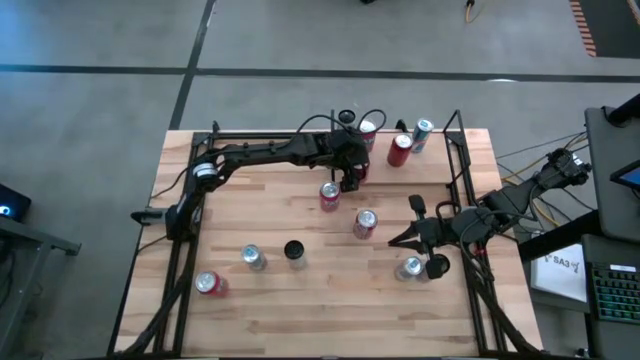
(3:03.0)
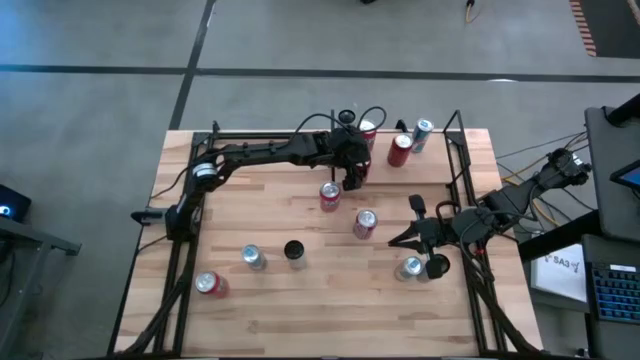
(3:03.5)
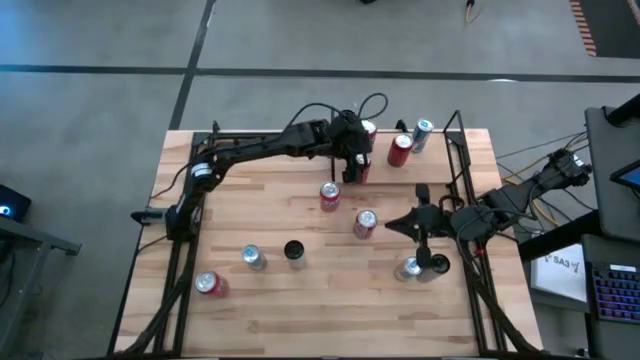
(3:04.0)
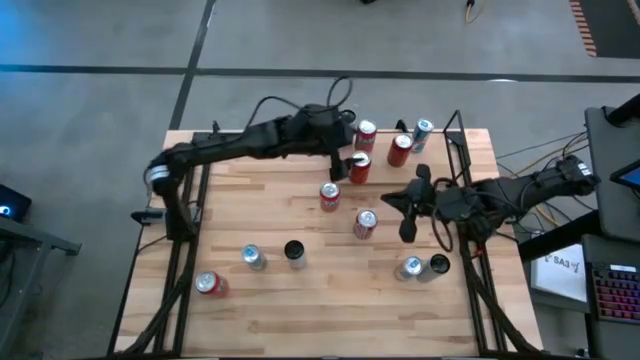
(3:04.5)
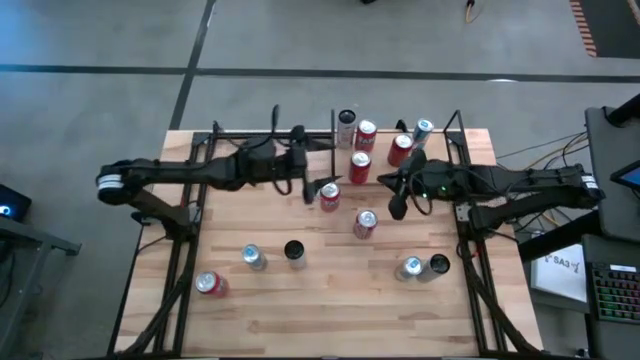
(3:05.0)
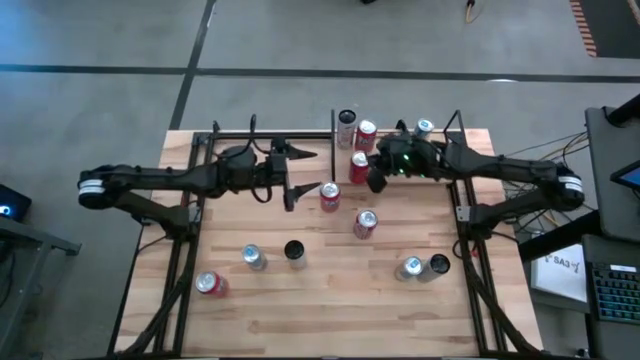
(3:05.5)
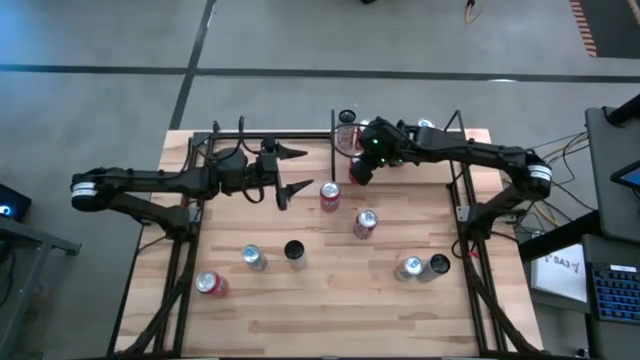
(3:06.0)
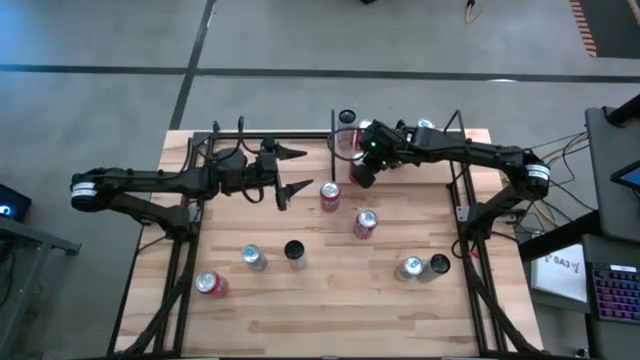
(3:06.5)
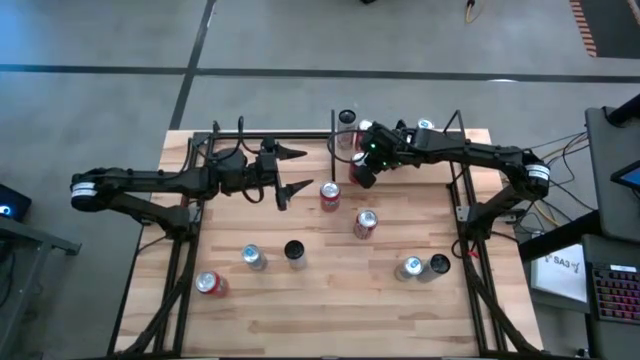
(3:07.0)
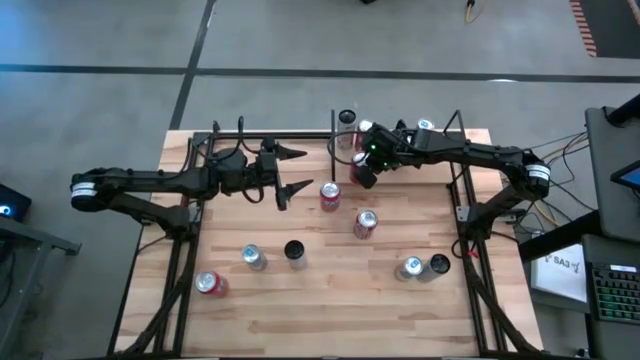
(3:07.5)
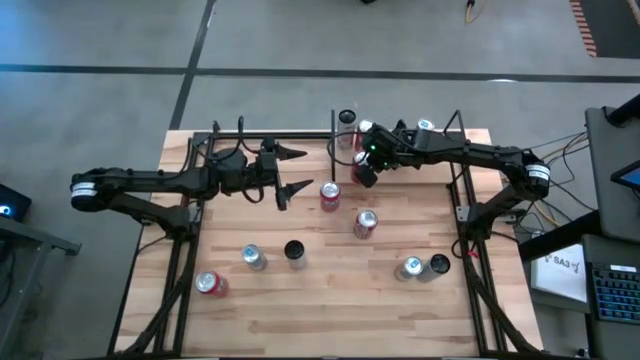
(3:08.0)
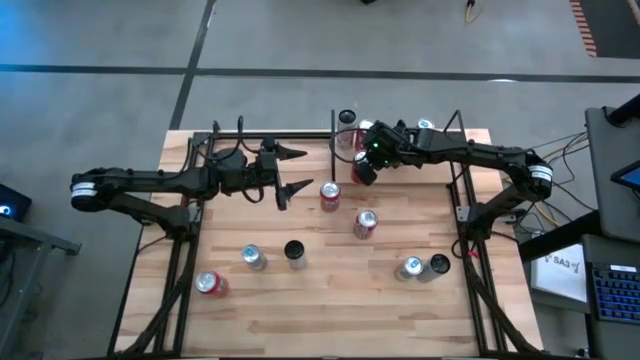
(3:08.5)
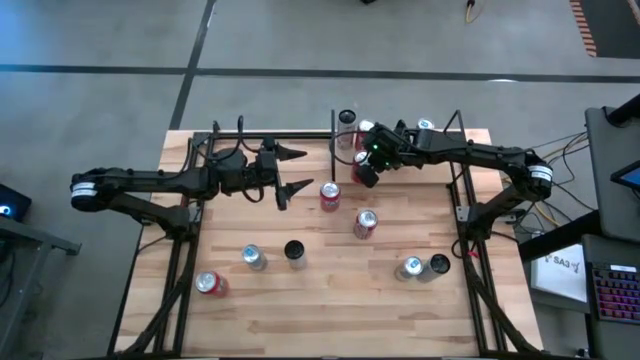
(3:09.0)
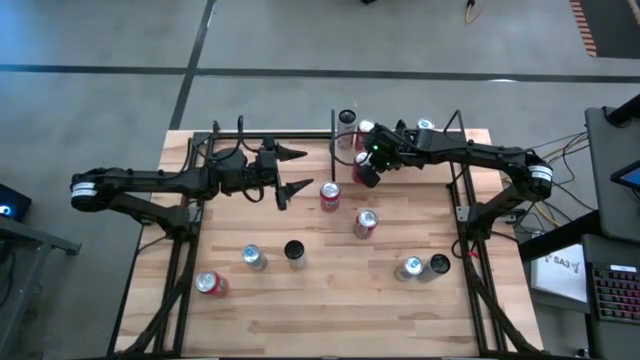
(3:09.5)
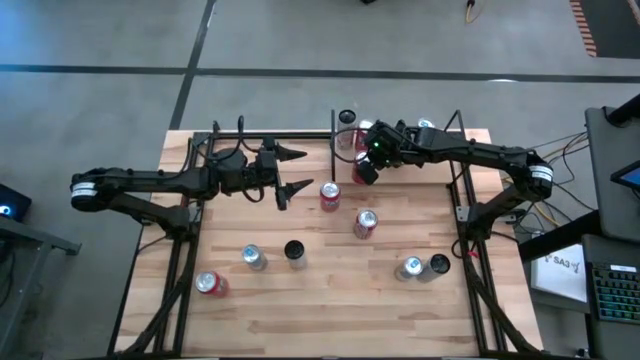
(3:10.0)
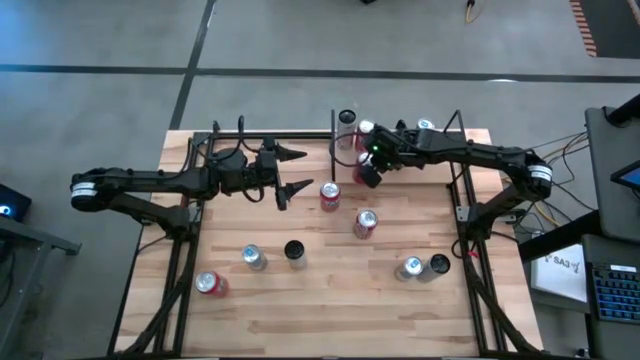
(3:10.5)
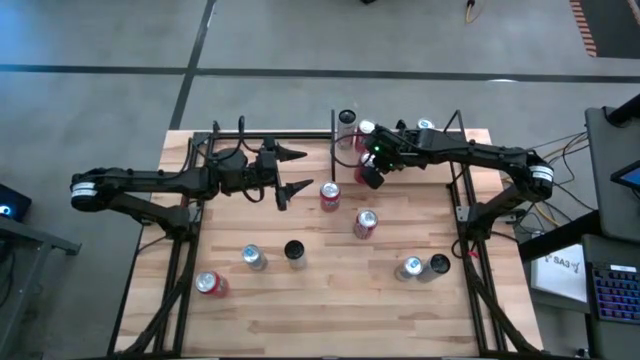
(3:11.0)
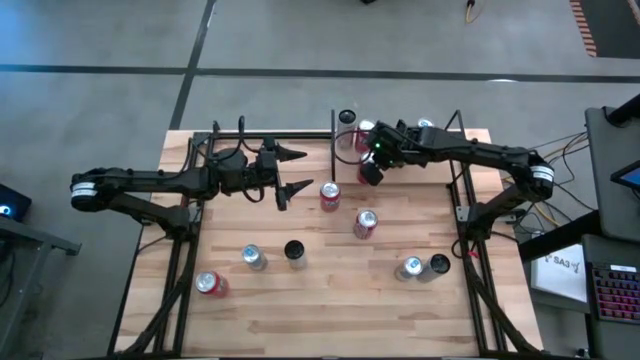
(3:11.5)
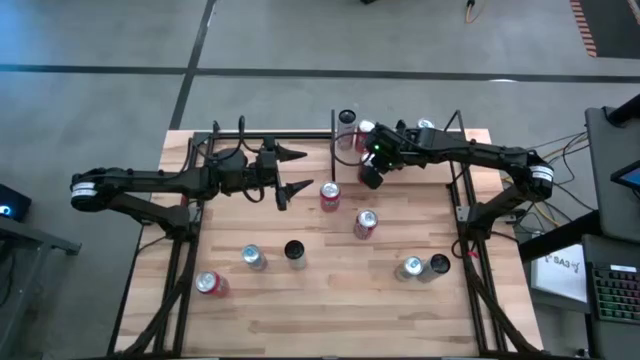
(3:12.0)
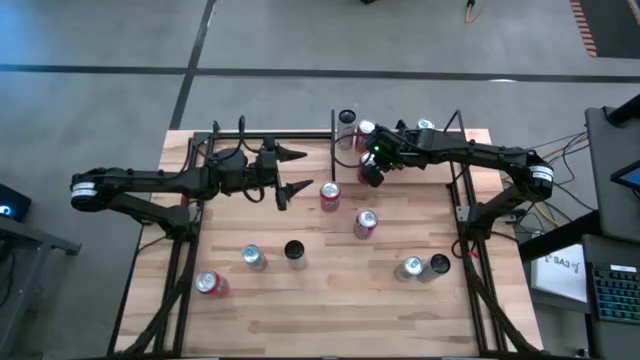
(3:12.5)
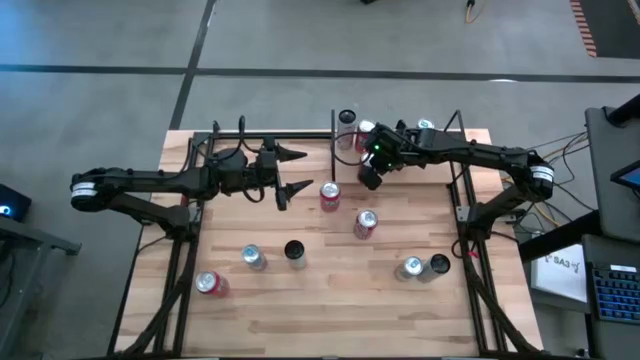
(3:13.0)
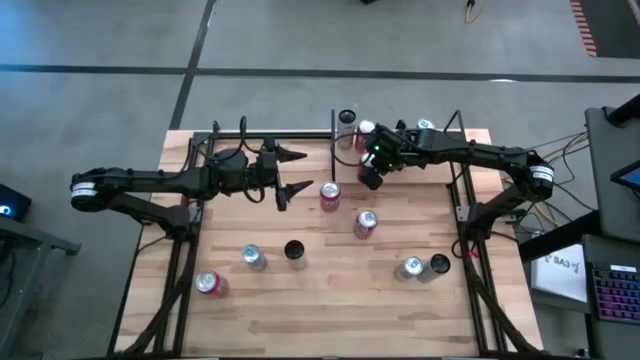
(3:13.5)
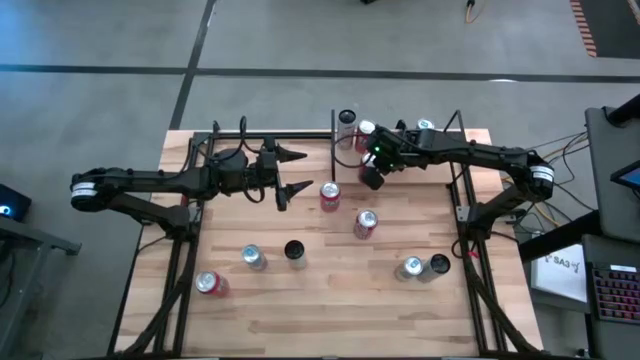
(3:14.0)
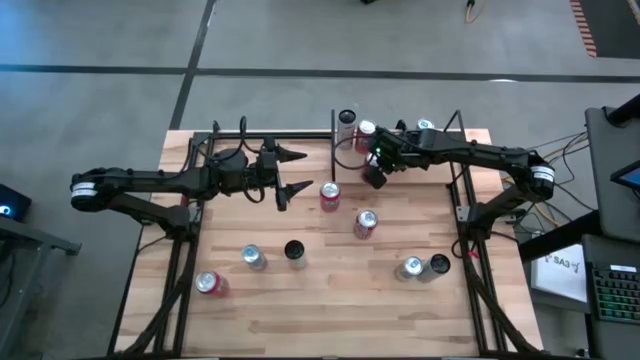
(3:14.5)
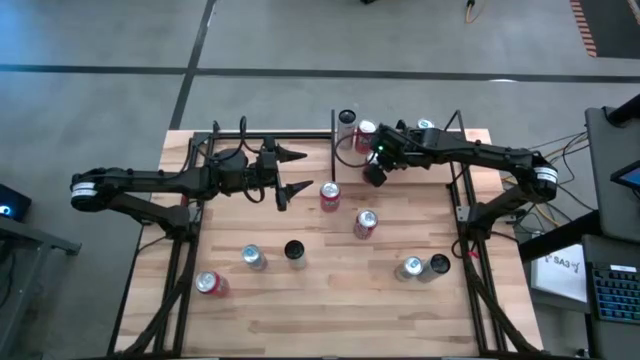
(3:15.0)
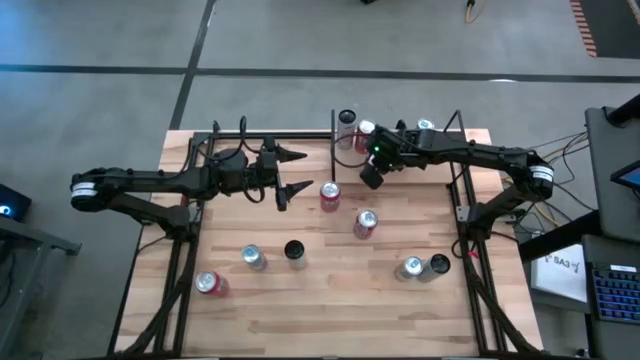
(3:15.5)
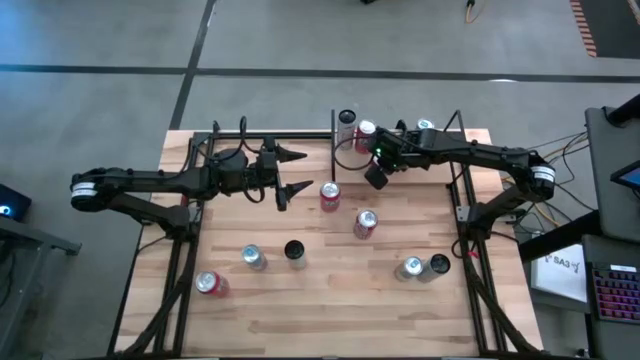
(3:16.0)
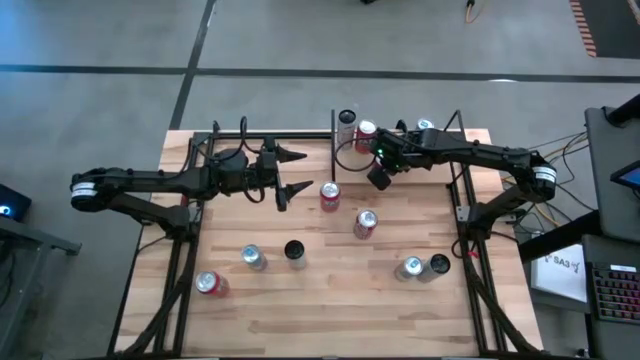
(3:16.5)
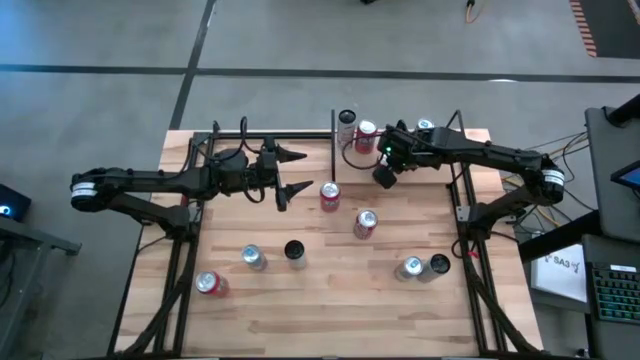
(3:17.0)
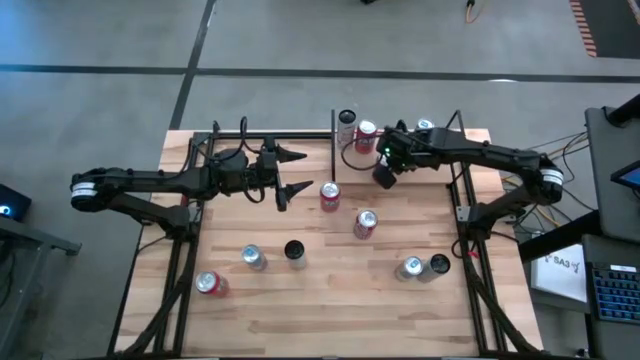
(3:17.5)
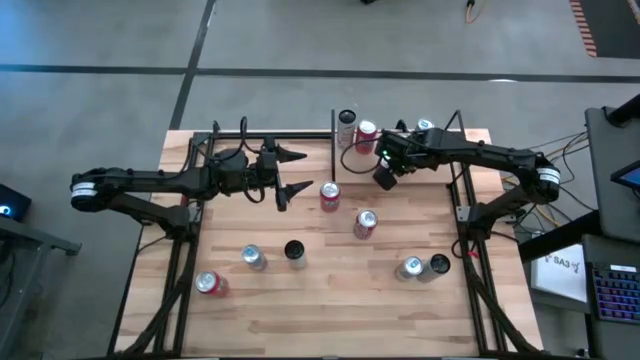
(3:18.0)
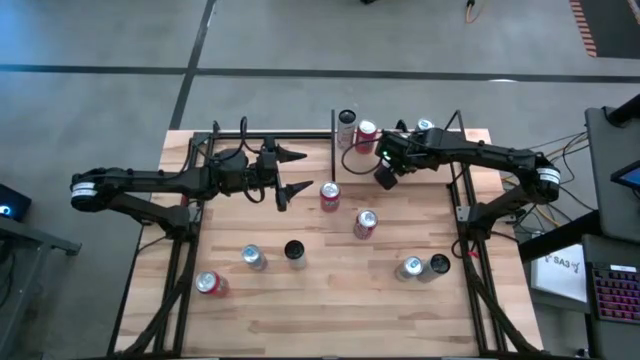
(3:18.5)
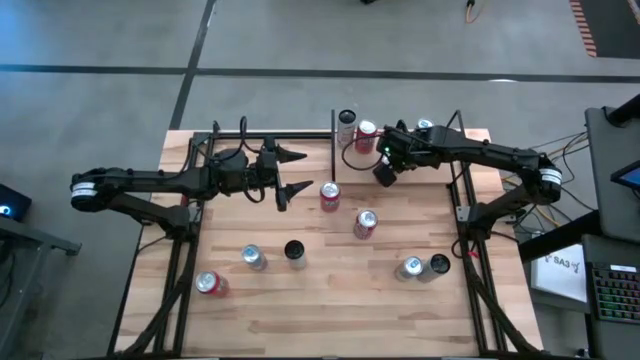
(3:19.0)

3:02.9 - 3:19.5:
Task: Place canned beverage on shelf
Put the red black soda can on the shelf aligned with the other red black soda can

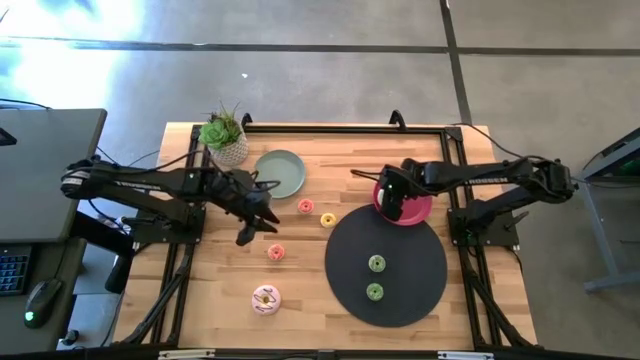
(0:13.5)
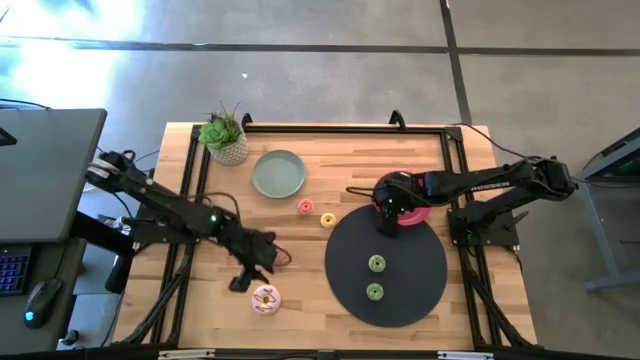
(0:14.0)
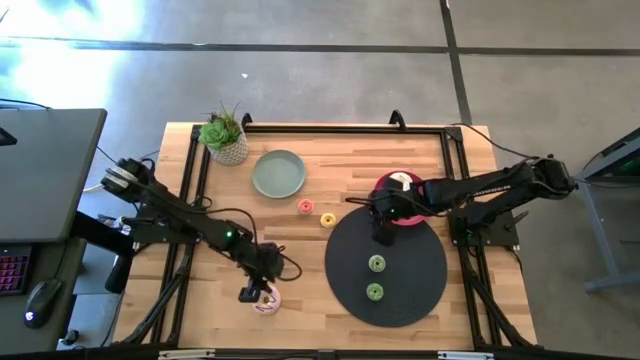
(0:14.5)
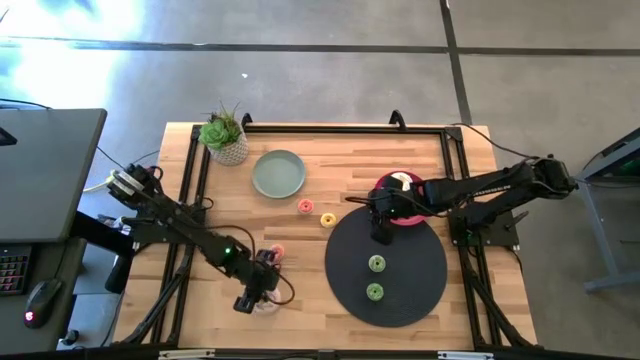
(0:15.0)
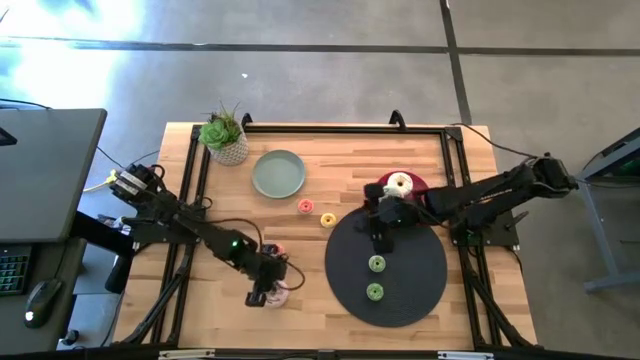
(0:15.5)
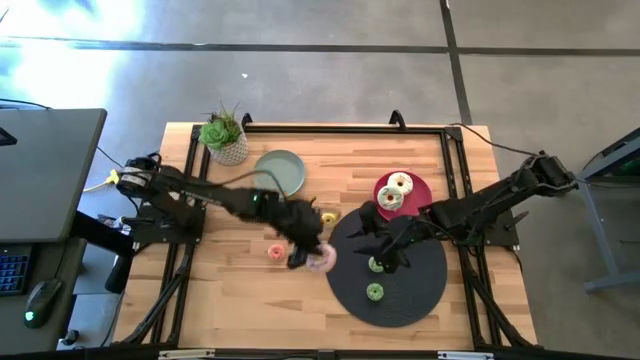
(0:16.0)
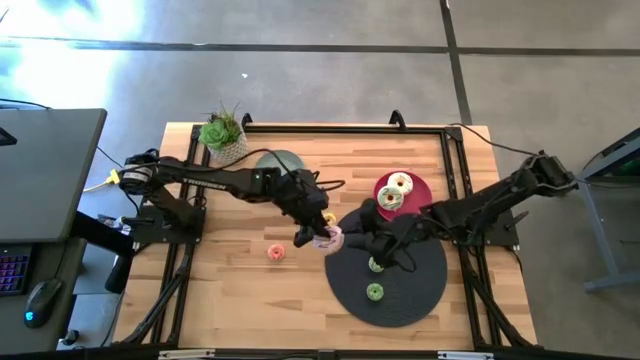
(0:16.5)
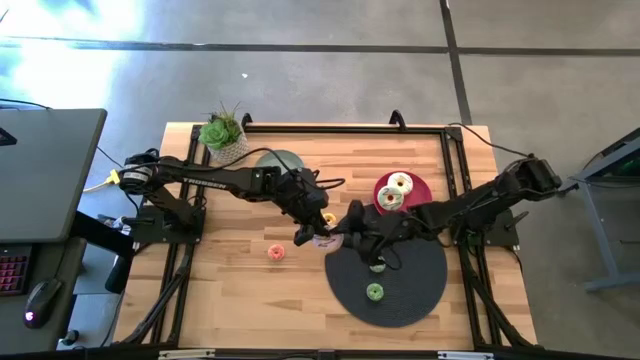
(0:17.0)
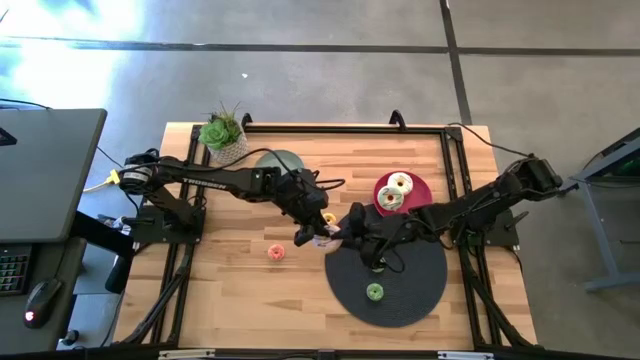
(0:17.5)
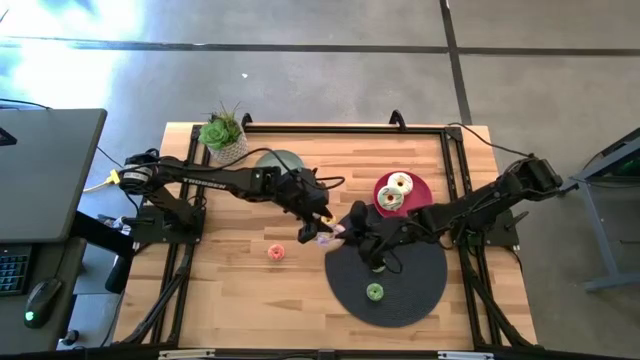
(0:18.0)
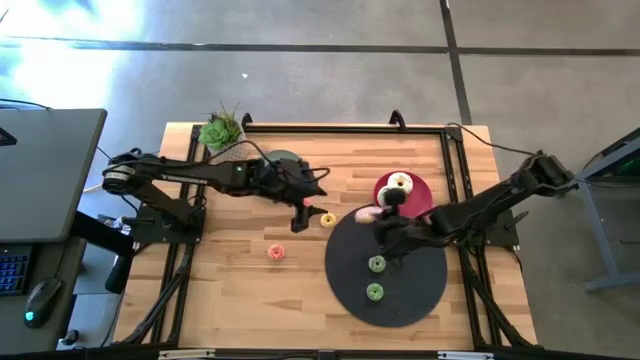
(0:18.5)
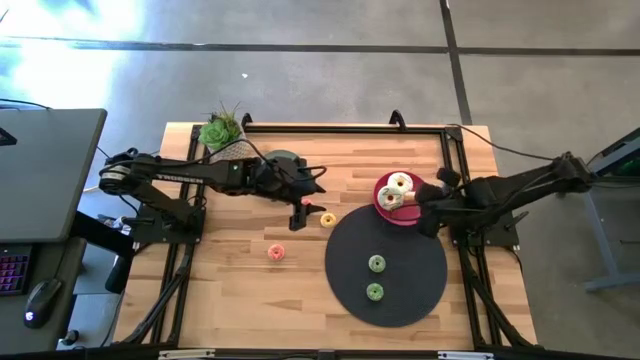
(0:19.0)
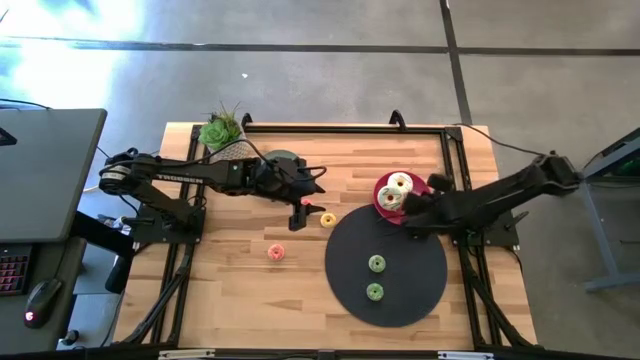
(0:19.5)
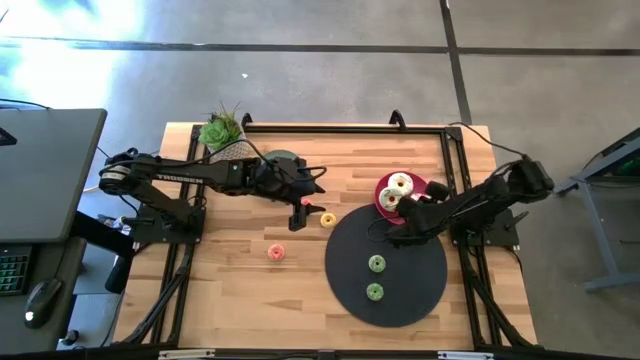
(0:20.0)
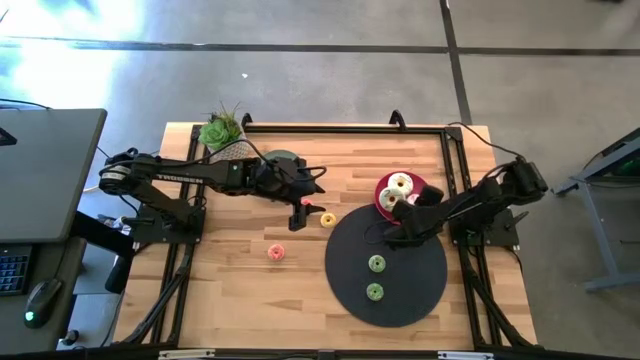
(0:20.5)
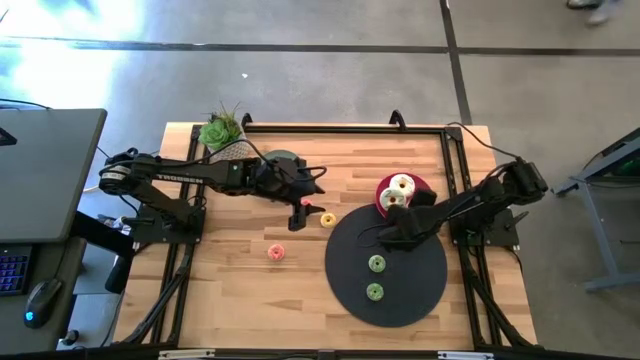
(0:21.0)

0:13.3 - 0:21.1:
Task: Pick & Place donuts
Put the big purple donut on the pink plate
